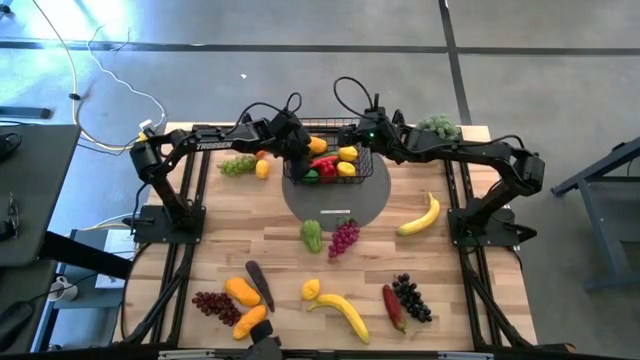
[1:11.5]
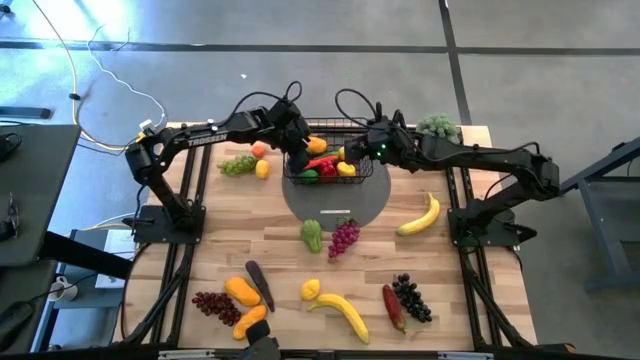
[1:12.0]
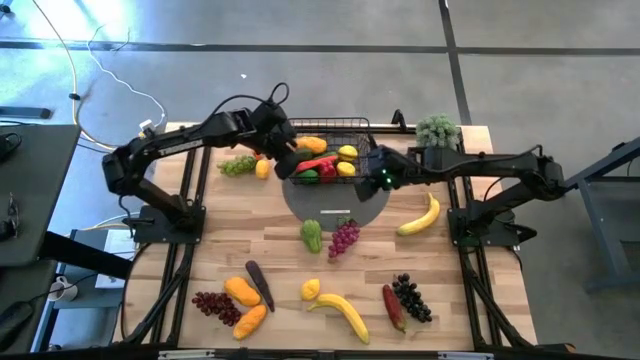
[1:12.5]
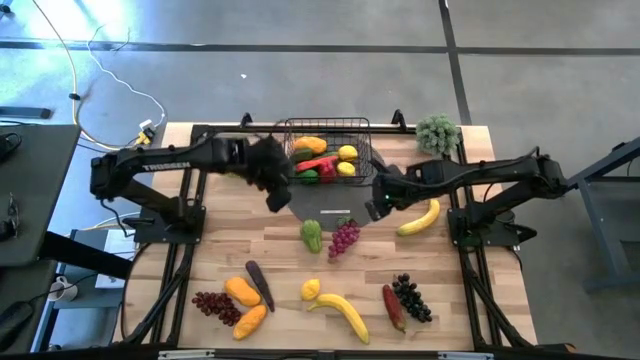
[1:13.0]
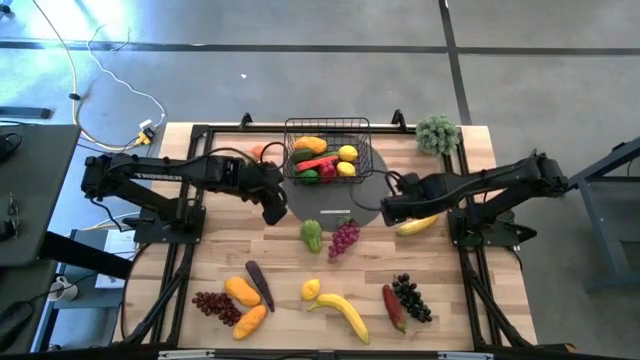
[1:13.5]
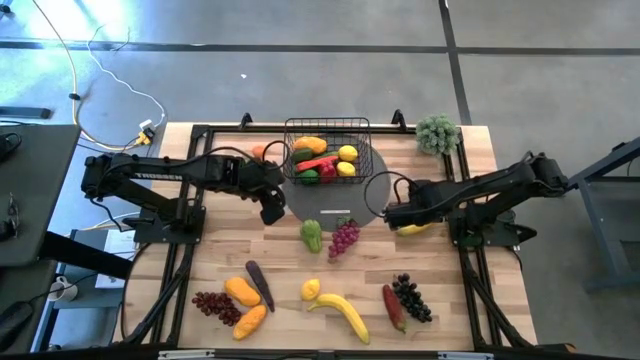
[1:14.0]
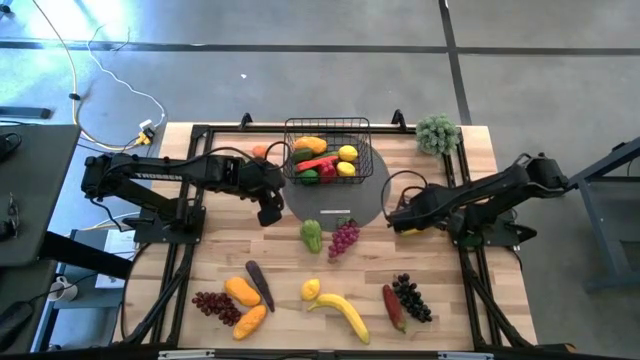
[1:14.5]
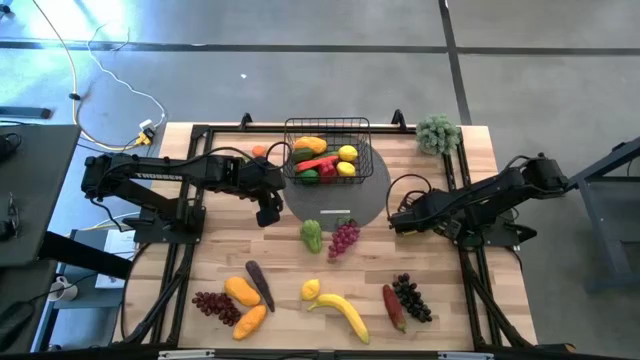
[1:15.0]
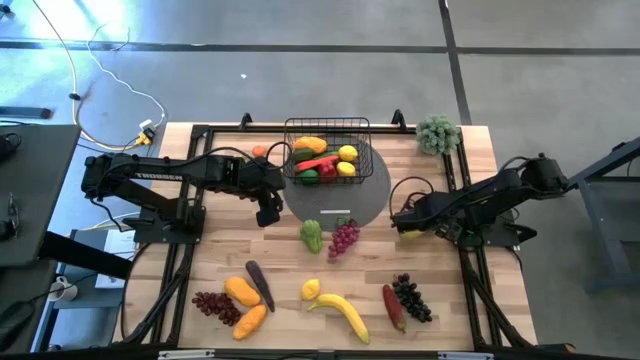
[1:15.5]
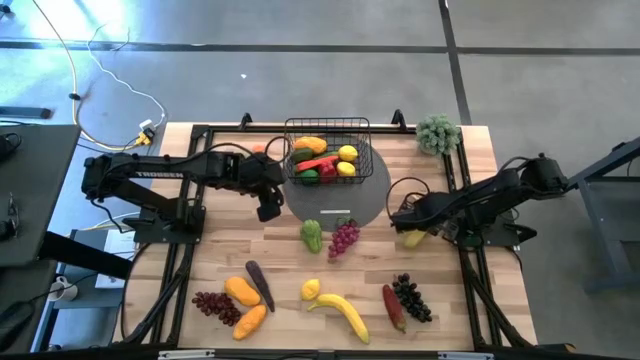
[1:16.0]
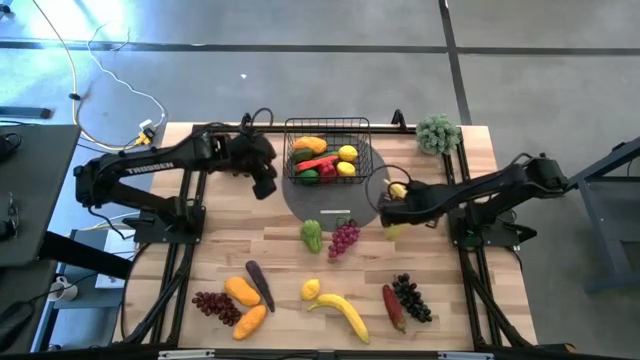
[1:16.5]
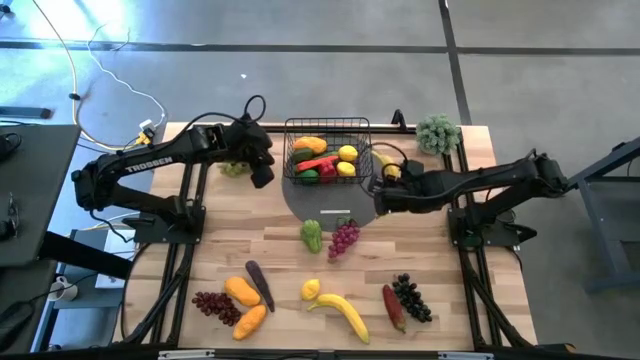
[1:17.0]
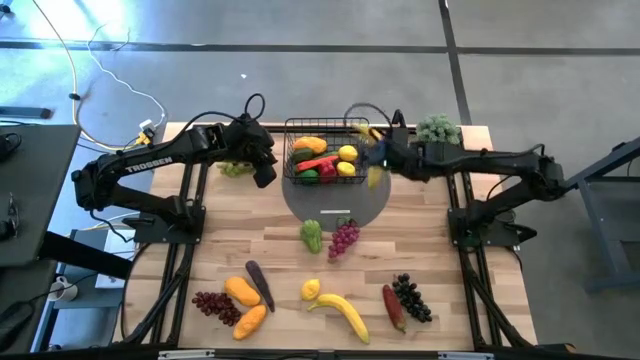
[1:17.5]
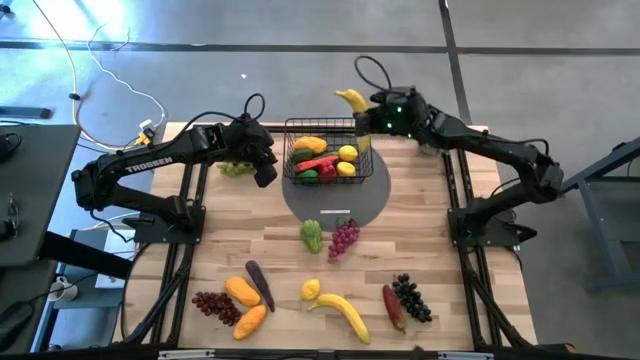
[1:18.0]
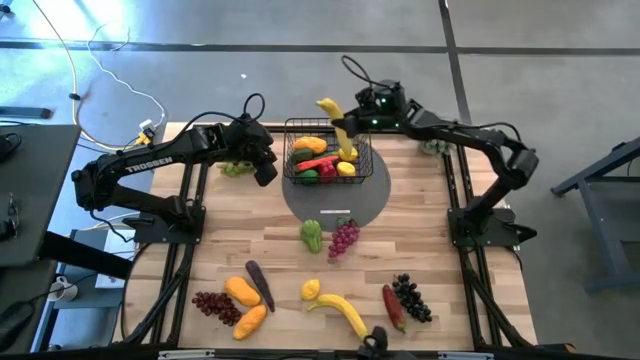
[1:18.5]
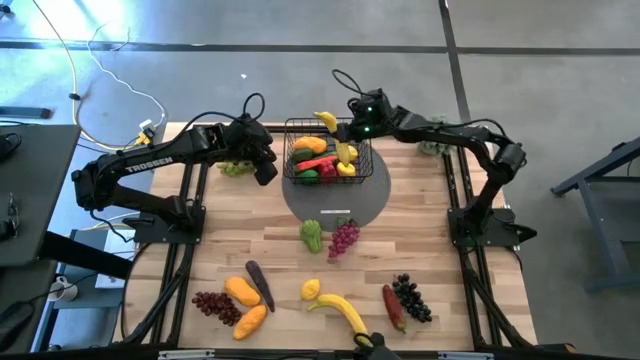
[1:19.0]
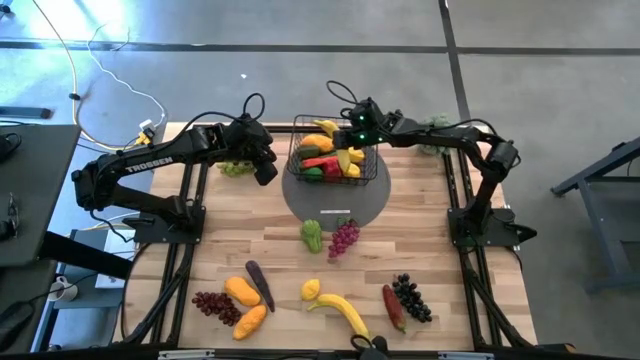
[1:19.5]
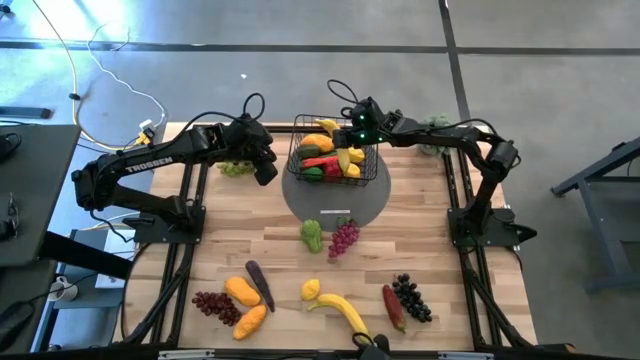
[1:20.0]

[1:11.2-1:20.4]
Task: Build produce basket
Put the yellow banana into the wire basket

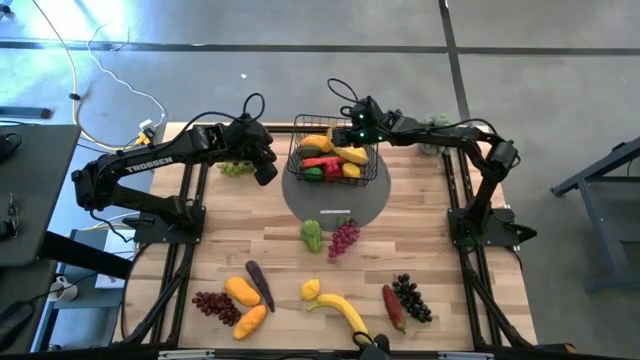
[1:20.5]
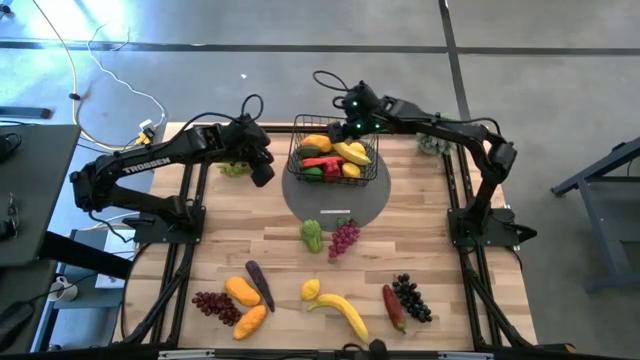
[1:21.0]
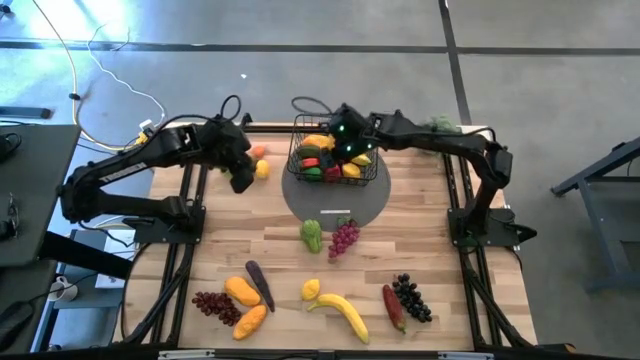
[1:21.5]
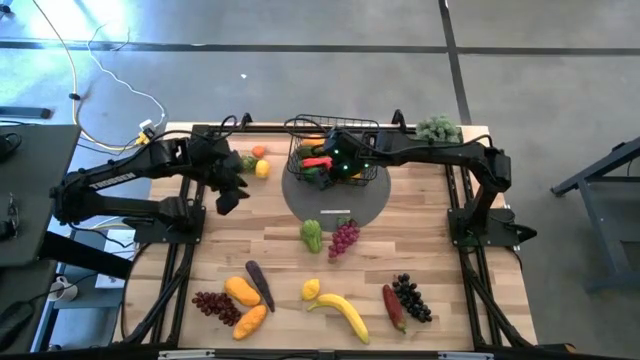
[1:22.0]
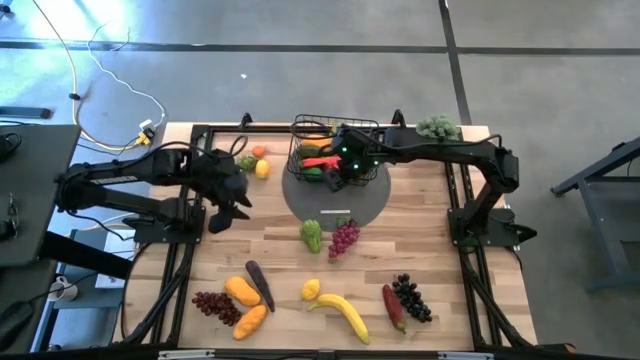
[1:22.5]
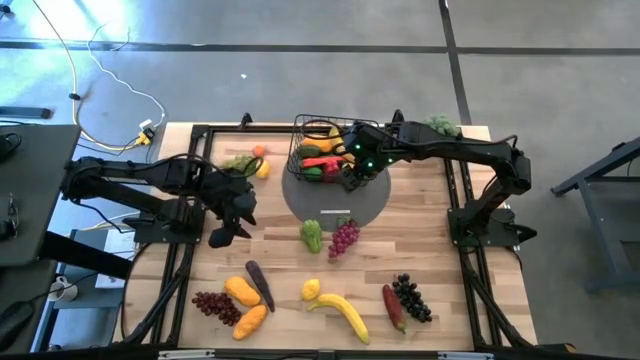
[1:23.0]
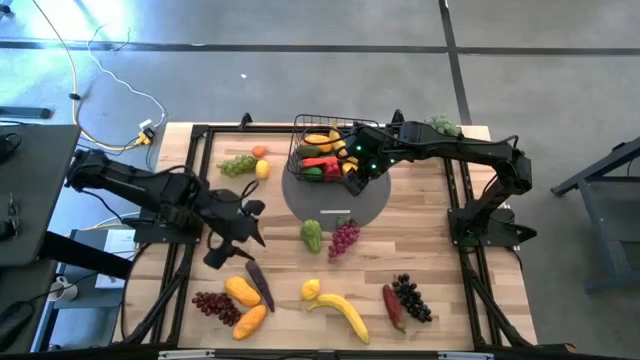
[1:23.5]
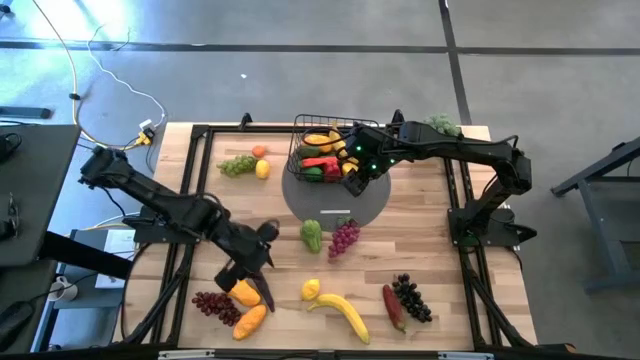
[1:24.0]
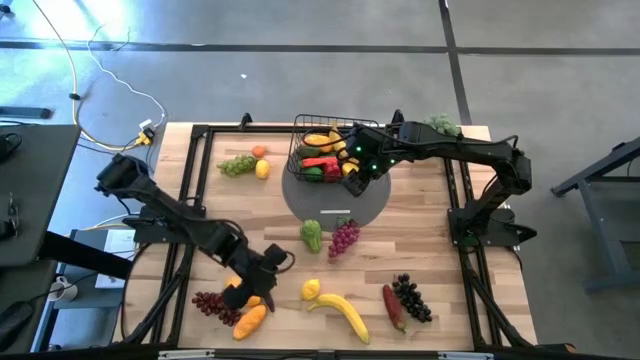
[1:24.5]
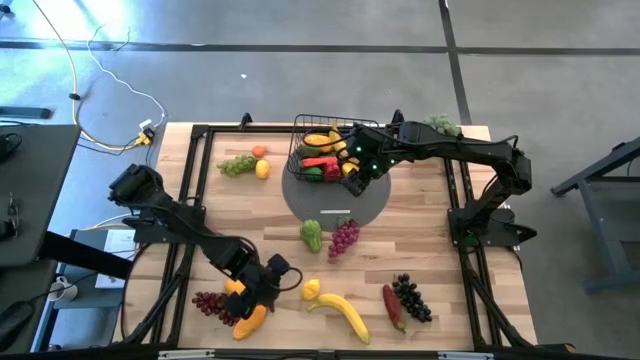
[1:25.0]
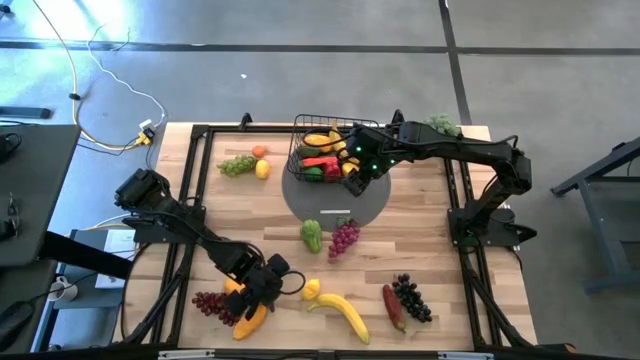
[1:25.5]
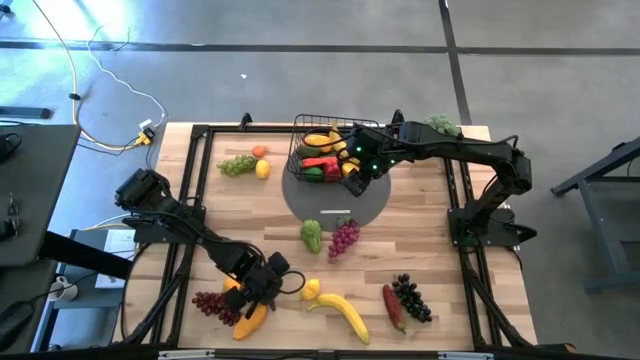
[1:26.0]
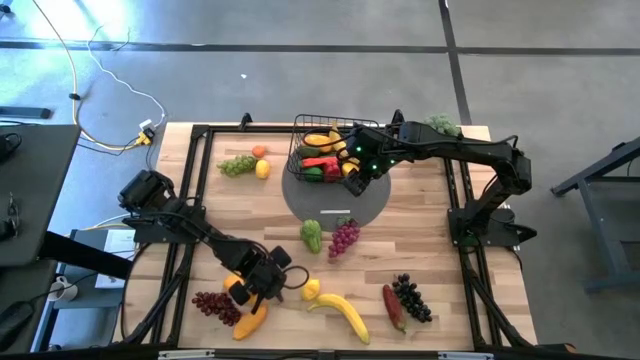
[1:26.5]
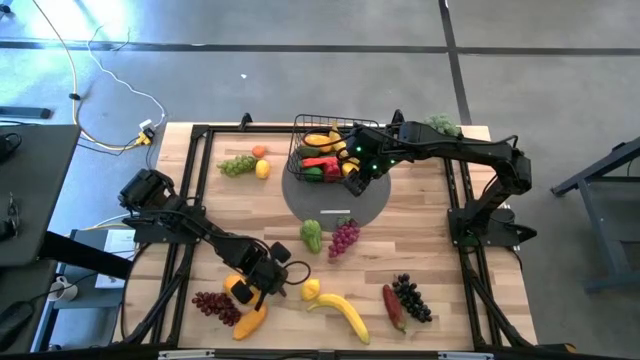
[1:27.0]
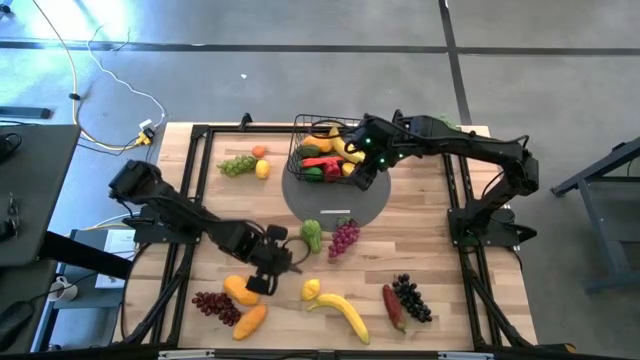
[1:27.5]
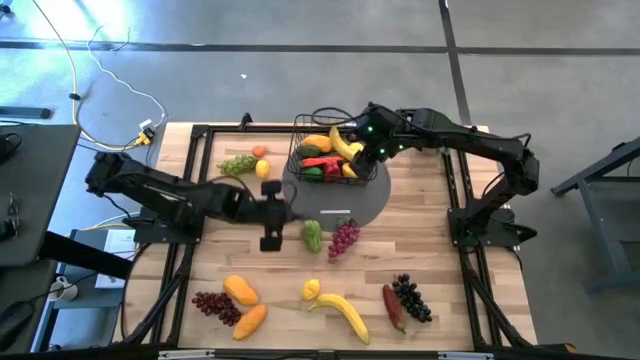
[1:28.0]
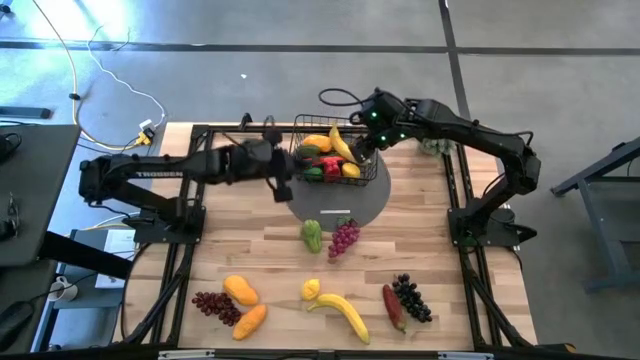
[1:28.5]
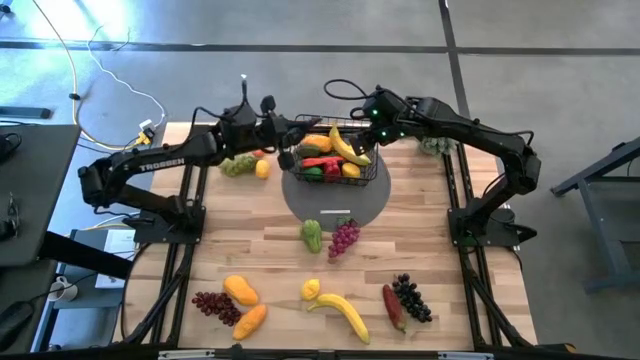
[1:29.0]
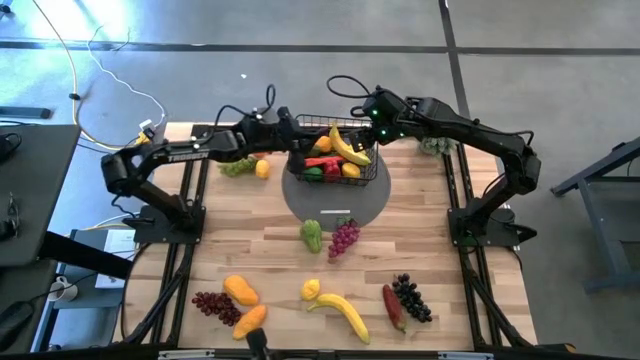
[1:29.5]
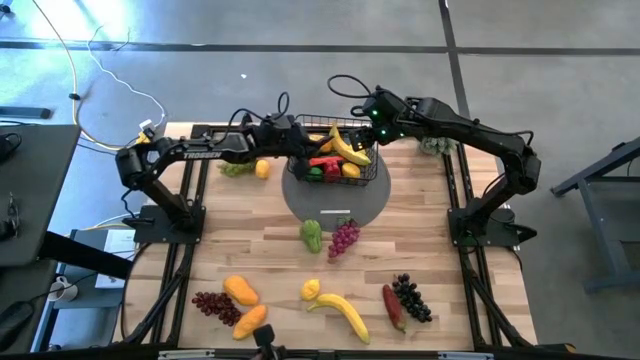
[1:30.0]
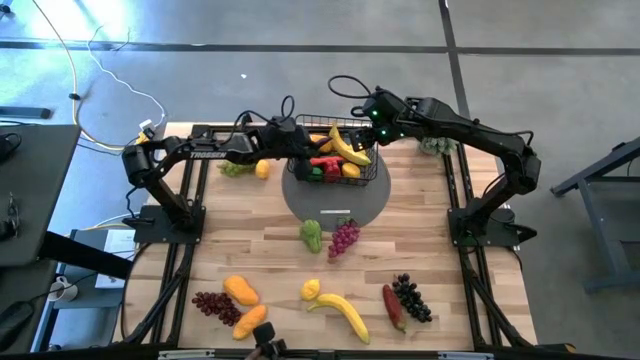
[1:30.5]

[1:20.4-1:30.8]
Put the purple eggplant into the wire basket
